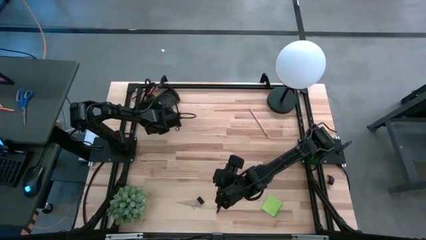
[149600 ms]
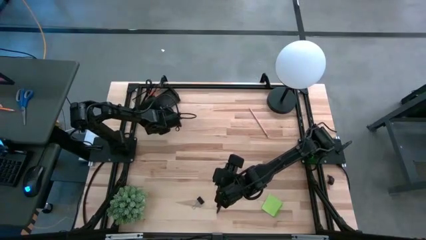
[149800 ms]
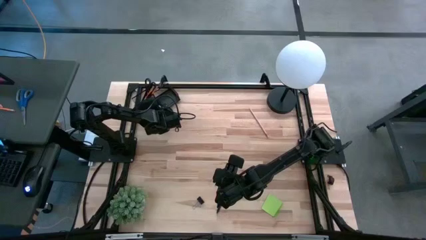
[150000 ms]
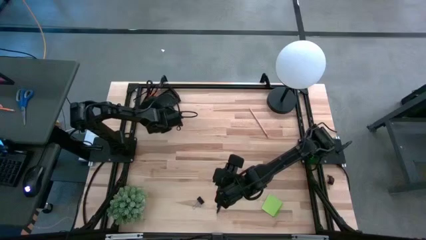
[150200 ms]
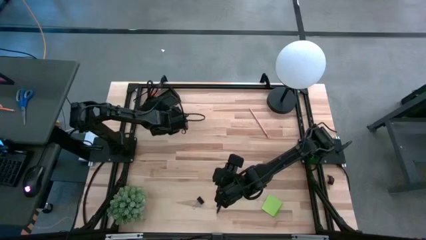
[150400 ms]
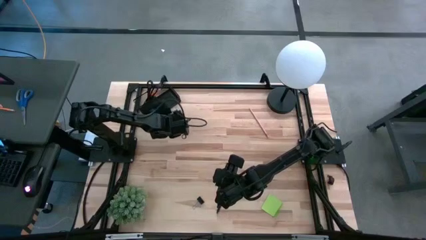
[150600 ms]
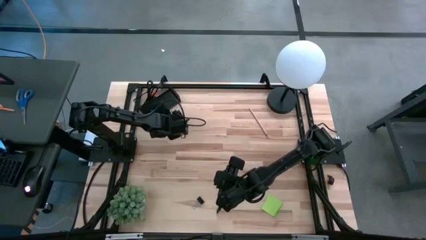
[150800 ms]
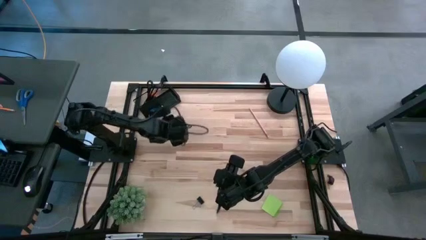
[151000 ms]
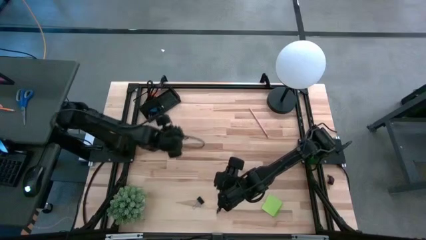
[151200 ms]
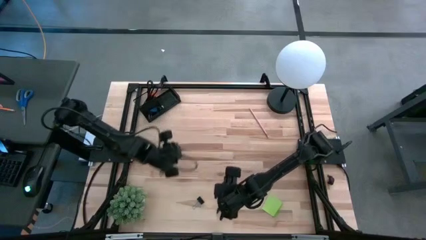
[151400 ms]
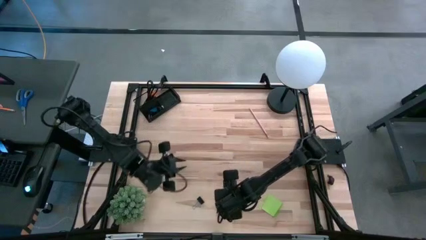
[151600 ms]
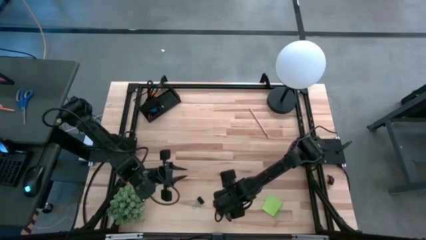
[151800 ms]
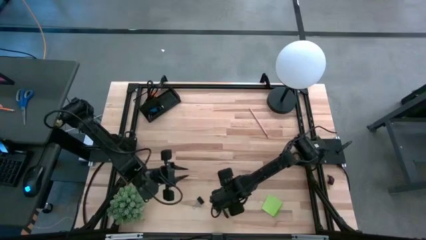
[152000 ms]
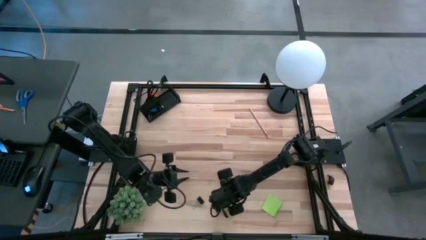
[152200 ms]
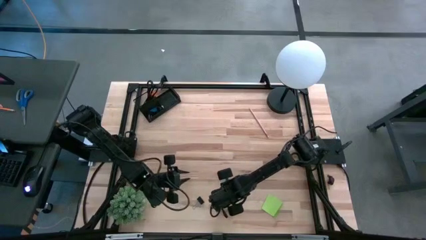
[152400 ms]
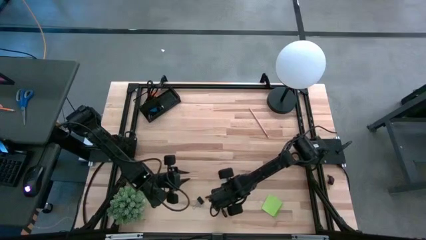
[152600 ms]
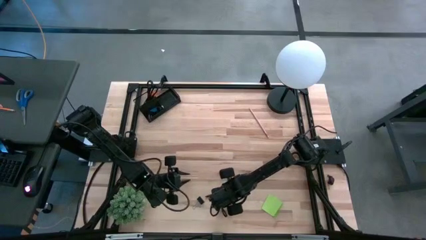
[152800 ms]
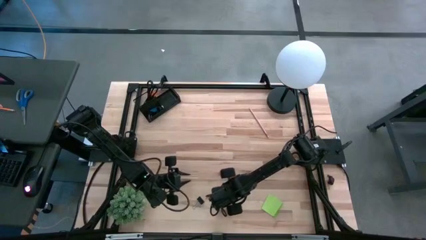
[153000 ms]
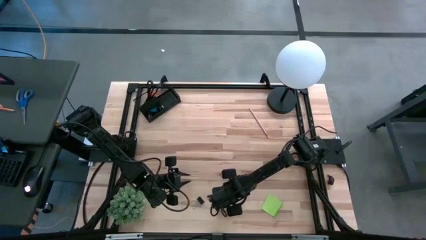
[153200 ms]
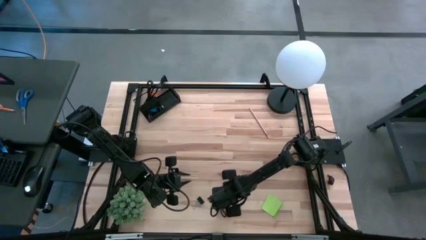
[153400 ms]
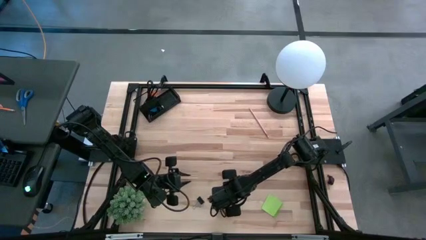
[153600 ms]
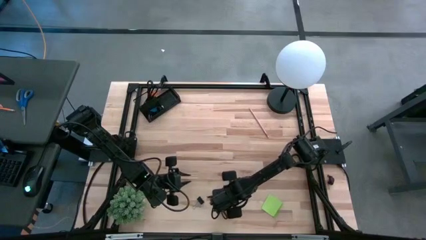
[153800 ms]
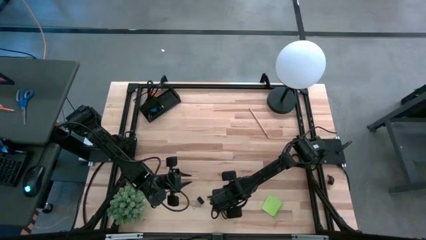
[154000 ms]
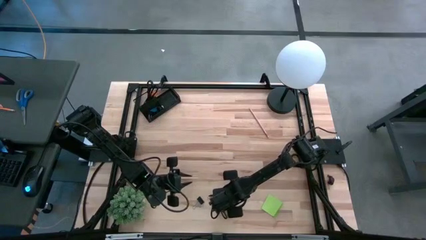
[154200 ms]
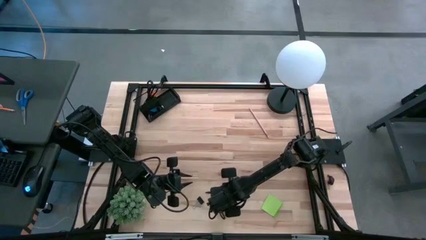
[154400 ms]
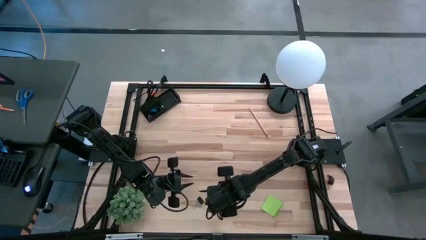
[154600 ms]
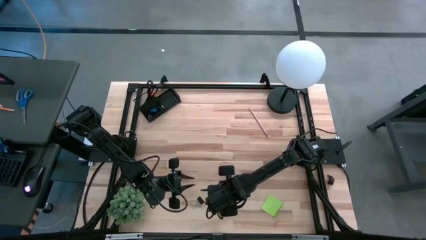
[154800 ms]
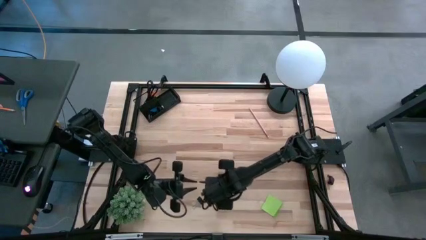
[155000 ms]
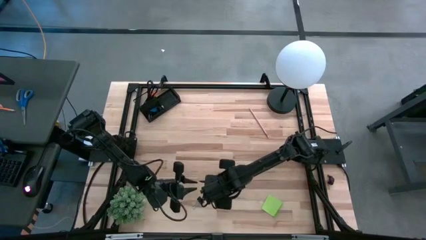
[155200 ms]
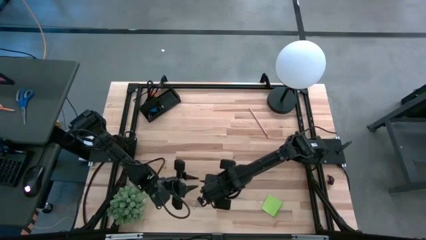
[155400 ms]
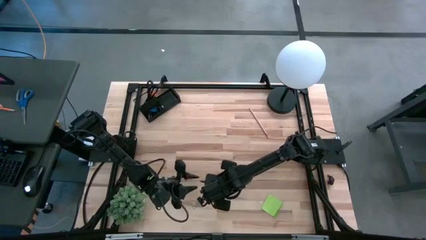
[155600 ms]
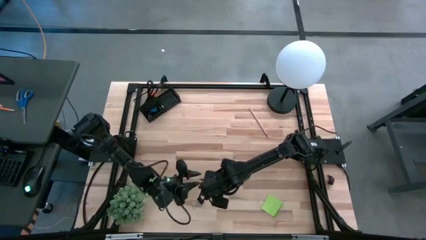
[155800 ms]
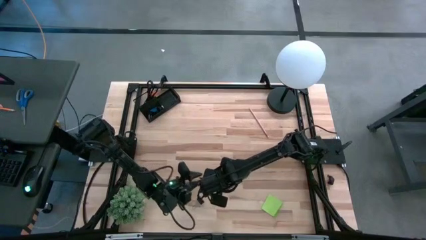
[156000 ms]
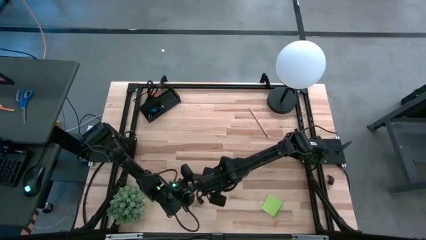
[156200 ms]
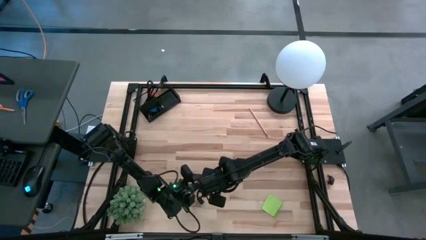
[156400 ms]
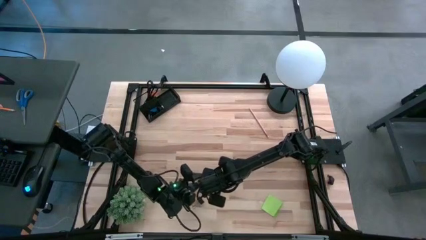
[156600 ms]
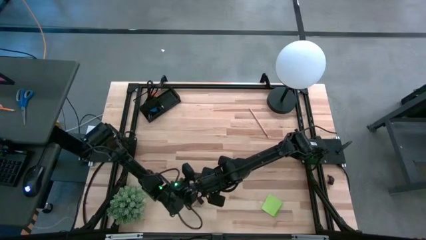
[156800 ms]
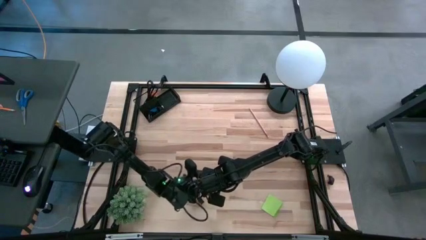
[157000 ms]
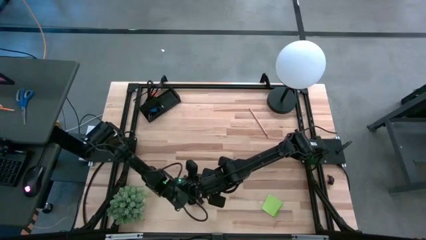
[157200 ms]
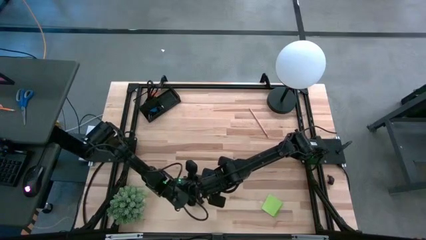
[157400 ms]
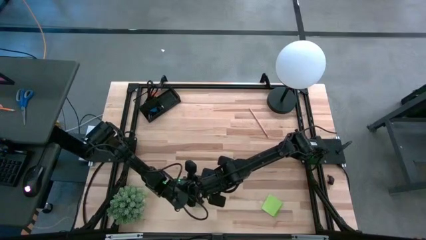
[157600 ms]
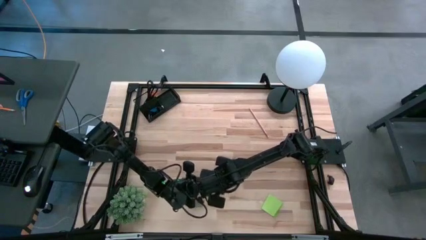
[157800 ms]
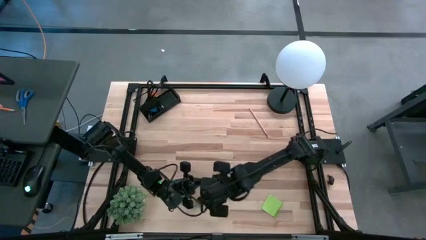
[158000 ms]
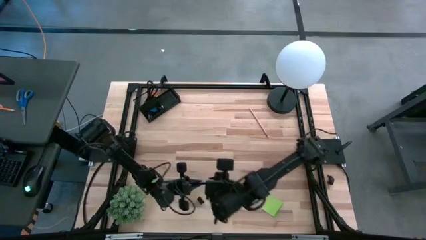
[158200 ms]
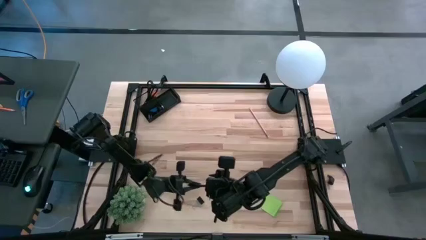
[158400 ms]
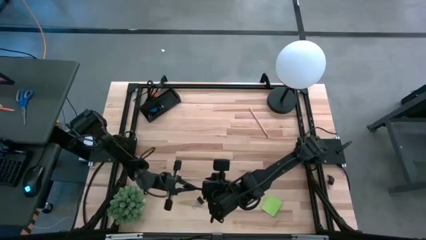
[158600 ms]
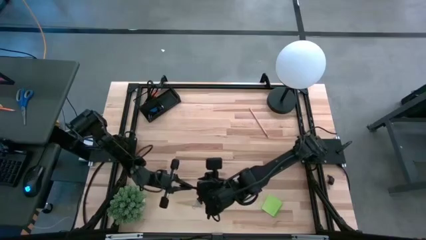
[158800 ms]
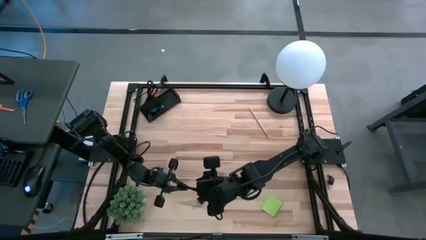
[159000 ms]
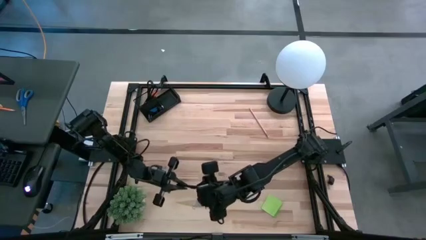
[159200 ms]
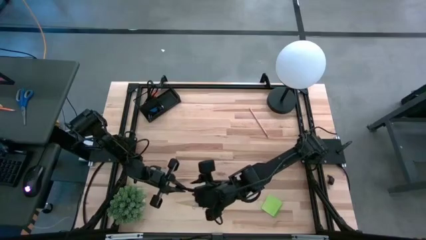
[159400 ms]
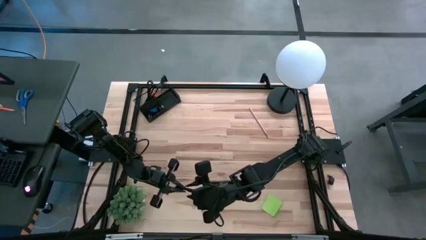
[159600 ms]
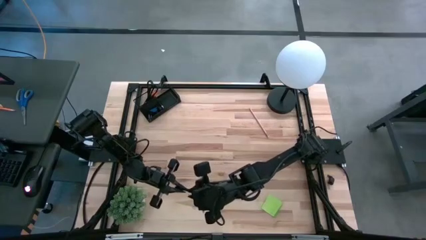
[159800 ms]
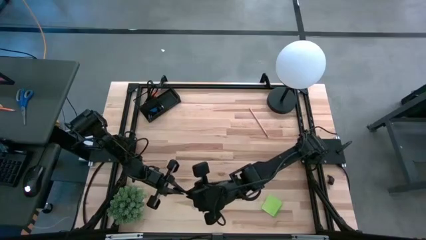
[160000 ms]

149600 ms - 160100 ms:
Task: Pick and place office supplies into organizer
Put the black pen into the black desk organizer

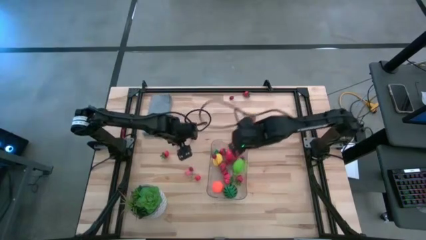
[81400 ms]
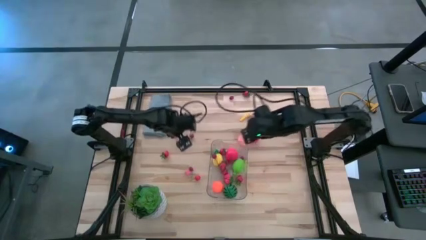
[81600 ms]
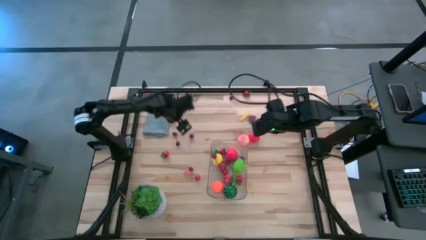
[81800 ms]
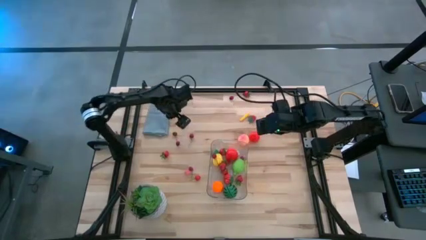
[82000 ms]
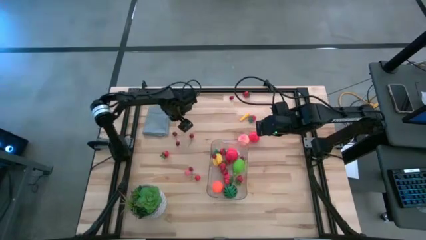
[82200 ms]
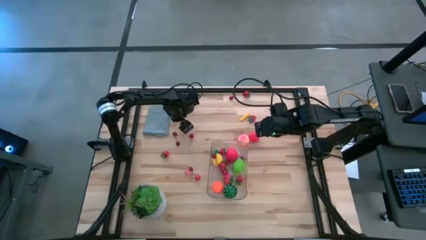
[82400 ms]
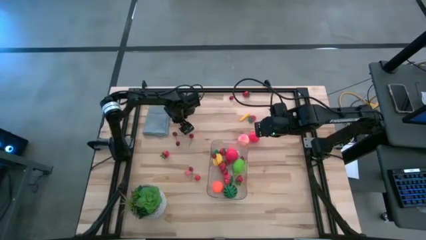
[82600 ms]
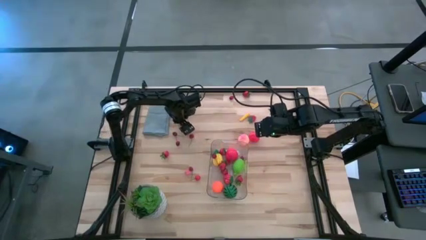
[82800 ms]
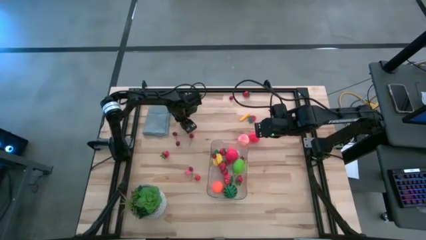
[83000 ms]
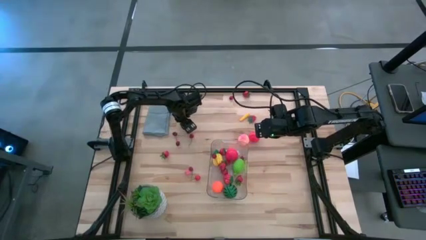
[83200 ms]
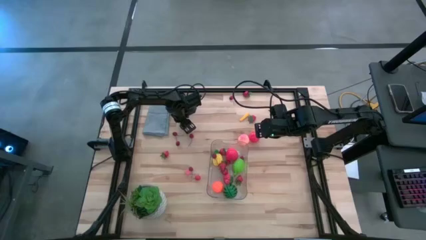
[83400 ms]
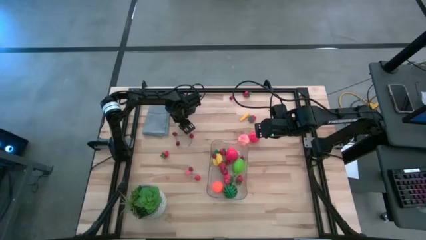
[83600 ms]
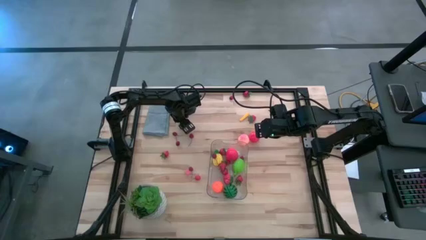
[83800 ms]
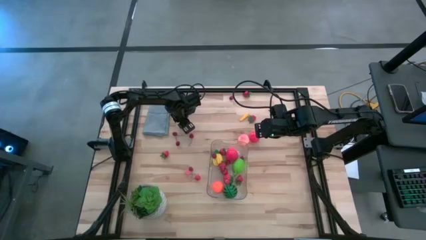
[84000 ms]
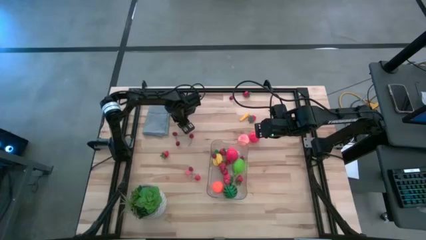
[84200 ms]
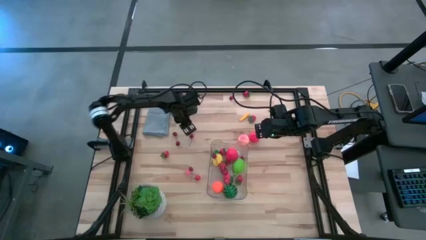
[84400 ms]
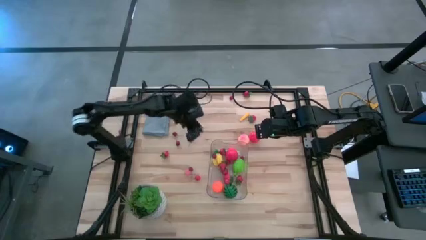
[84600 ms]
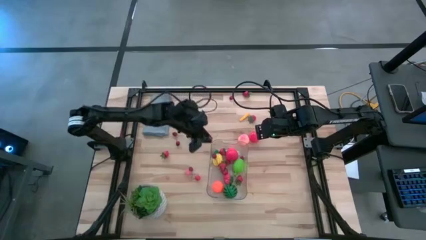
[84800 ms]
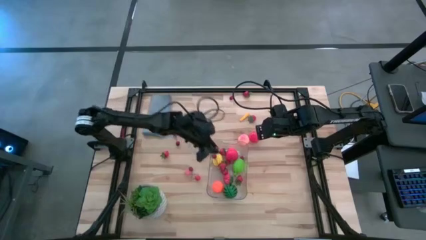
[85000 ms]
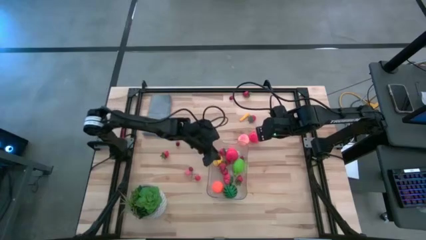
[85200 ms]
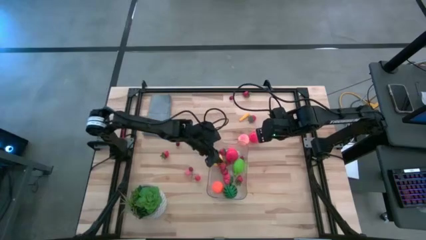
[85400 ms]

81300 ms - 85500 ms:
Task: Pick and placing Produce into tupperware
Put the cherry into the transparent bin
